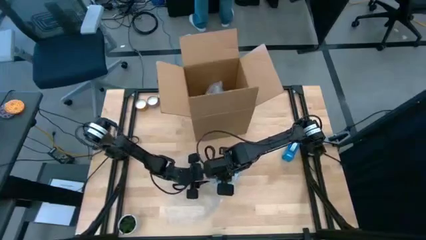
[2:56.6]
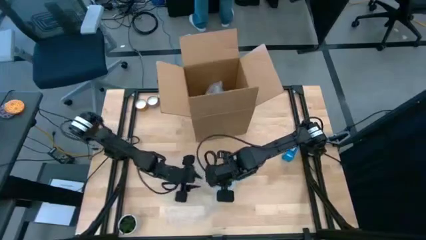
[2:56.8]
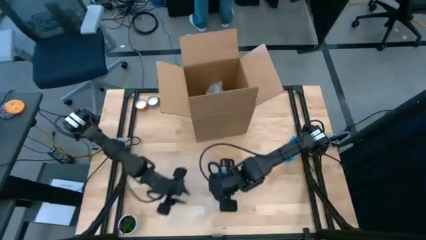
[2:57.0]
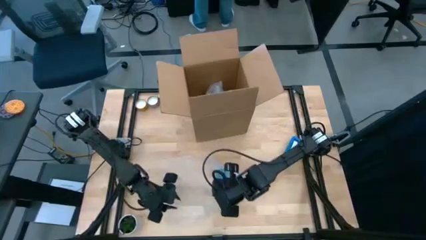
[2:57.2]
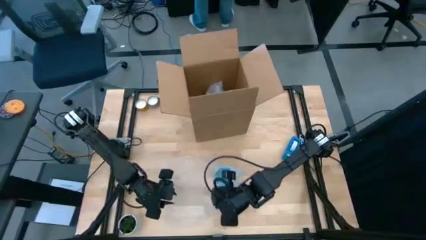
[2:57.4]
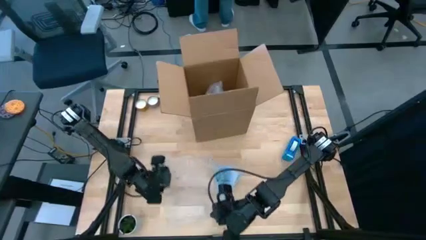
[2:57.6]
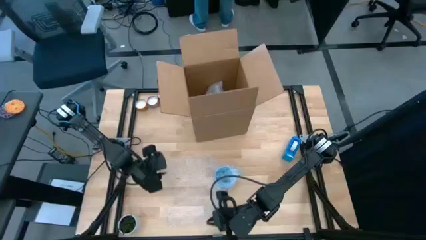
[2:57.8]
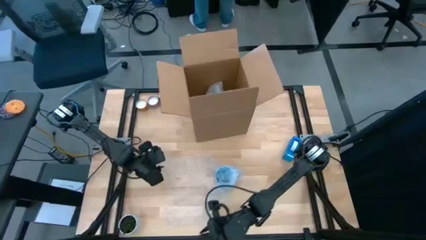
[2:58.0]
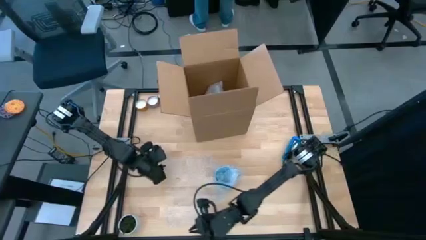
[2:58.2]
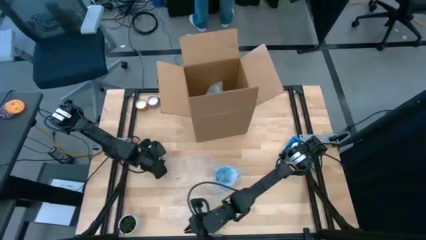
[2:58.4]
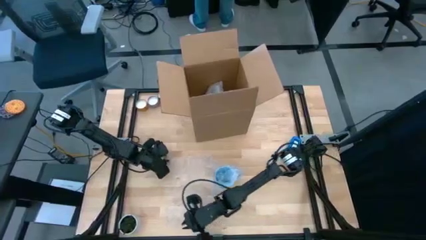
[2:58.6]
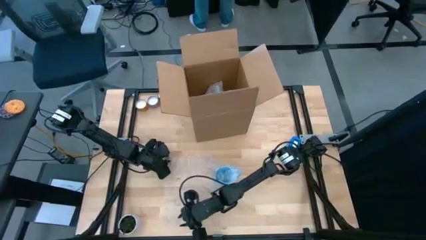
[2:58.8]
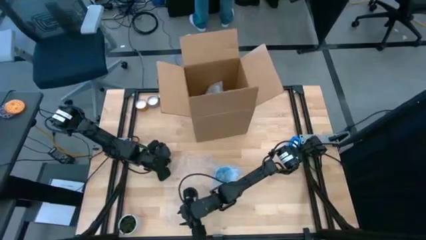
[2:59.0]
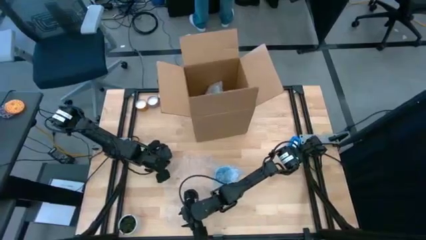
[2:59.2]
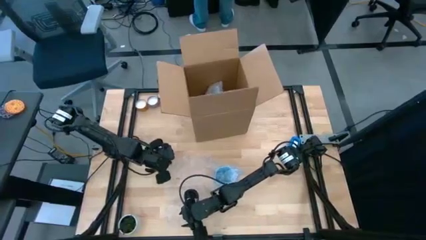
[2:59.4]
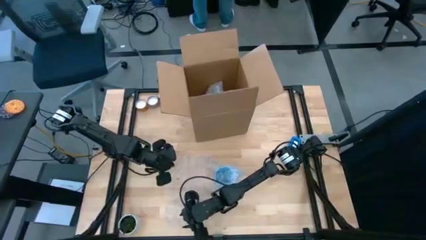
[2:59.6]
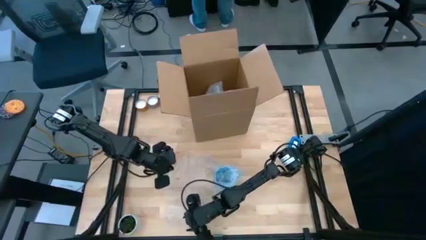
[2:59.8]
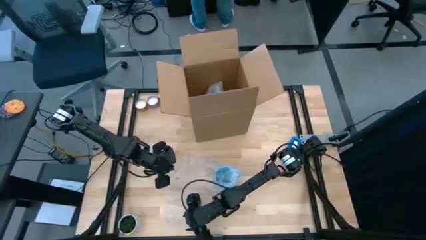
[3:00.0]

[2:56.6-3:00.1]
Task: wrap mug
Wrap the blue cup with bubble wrap

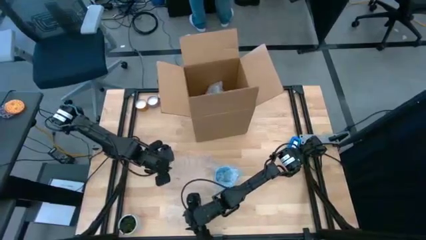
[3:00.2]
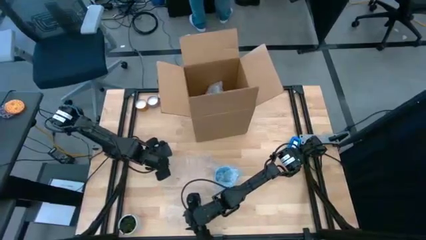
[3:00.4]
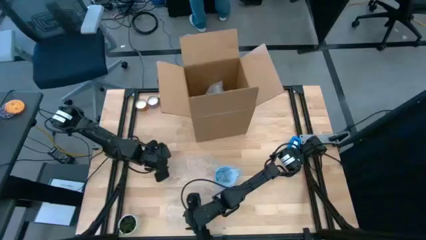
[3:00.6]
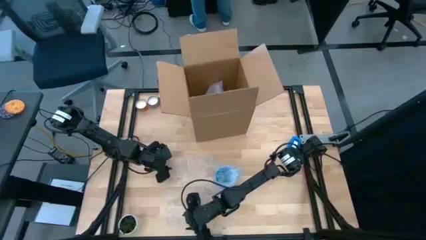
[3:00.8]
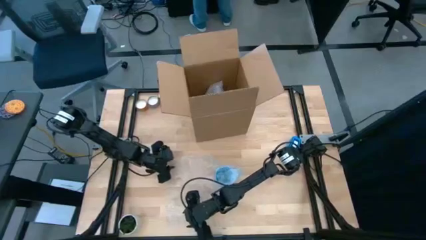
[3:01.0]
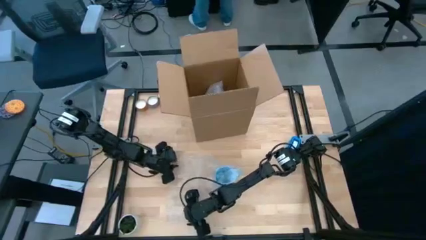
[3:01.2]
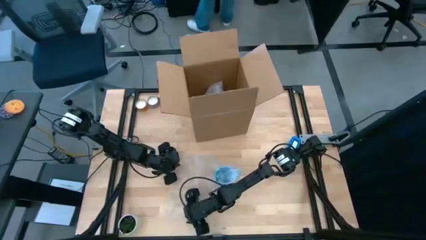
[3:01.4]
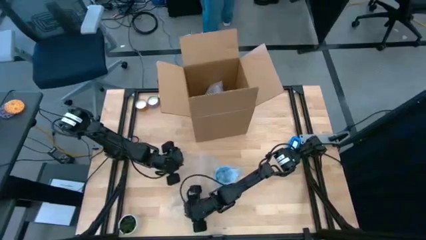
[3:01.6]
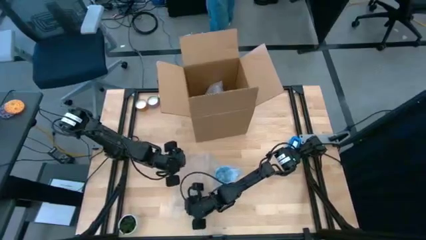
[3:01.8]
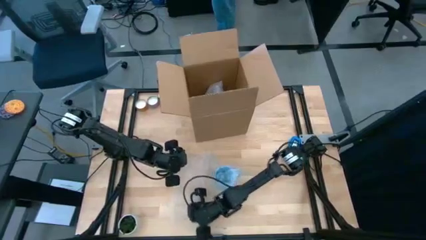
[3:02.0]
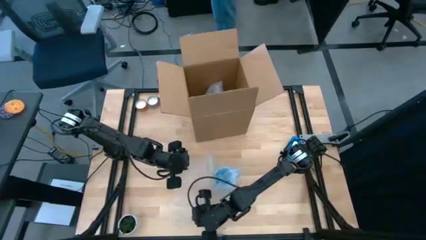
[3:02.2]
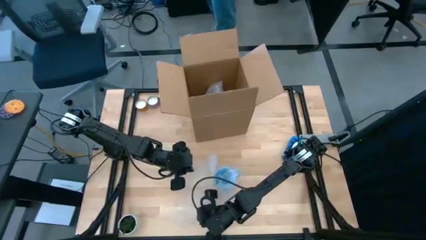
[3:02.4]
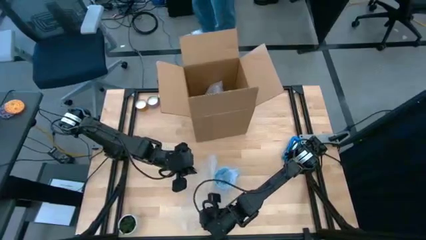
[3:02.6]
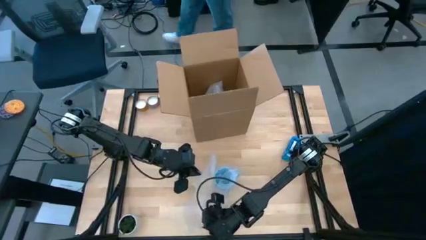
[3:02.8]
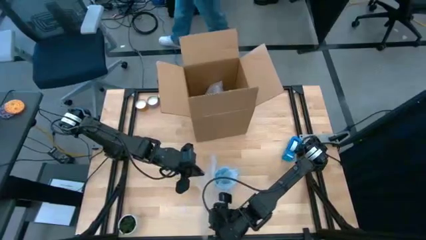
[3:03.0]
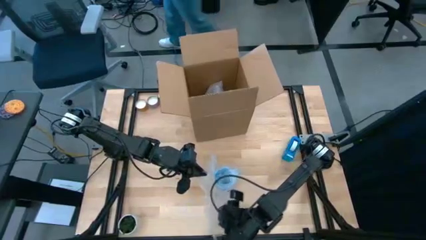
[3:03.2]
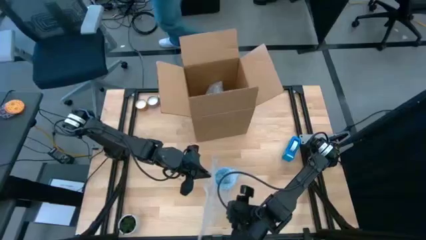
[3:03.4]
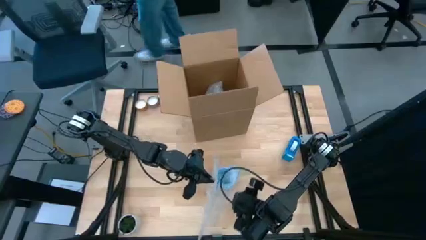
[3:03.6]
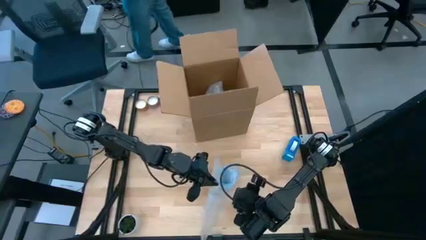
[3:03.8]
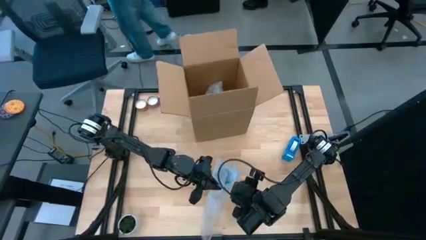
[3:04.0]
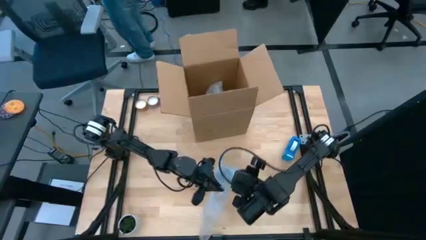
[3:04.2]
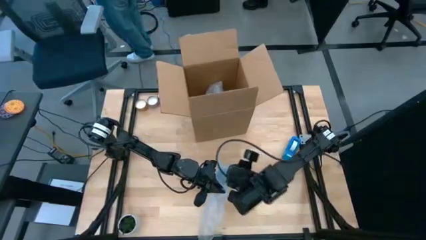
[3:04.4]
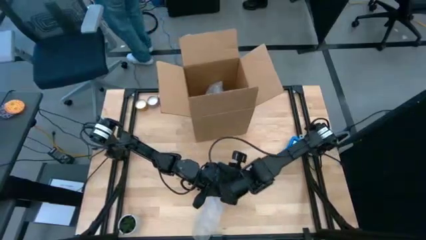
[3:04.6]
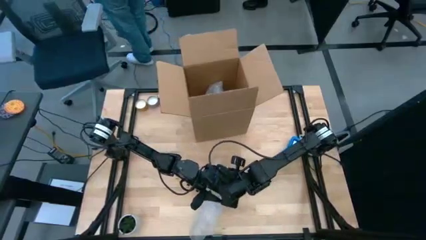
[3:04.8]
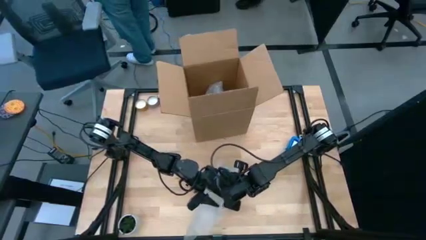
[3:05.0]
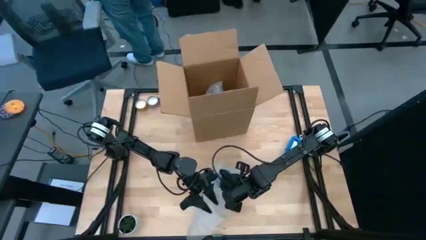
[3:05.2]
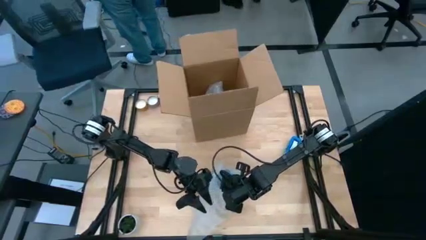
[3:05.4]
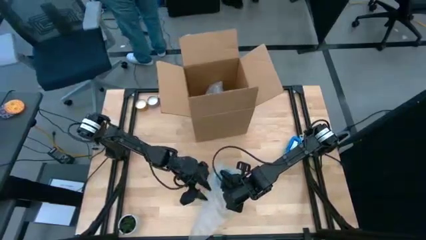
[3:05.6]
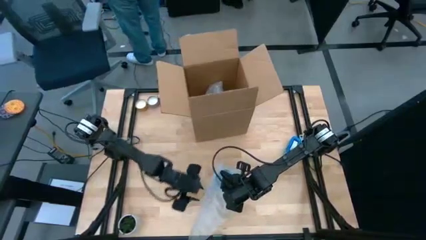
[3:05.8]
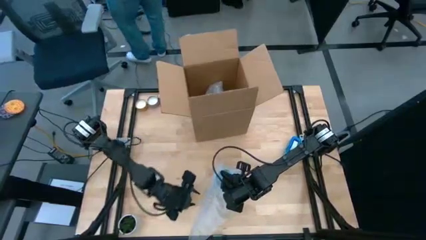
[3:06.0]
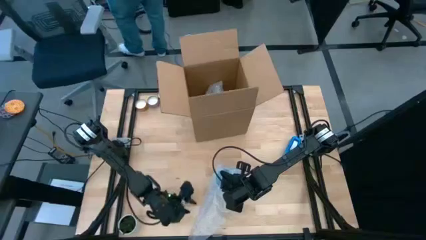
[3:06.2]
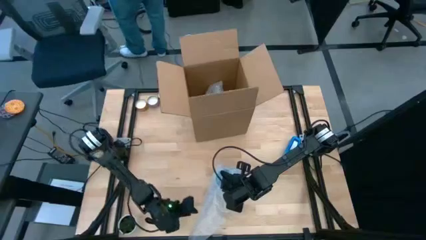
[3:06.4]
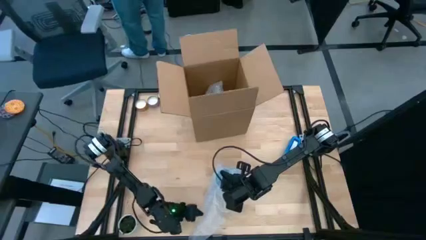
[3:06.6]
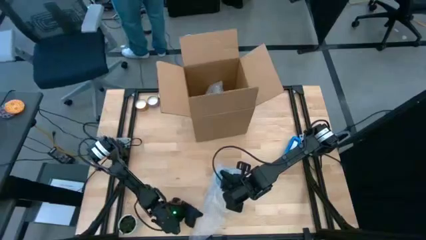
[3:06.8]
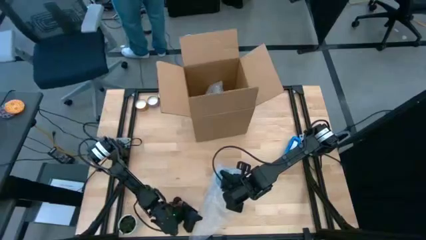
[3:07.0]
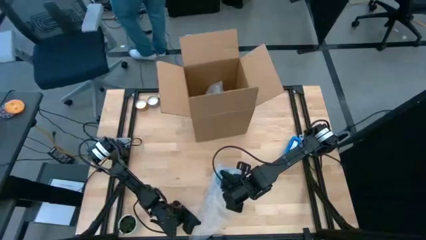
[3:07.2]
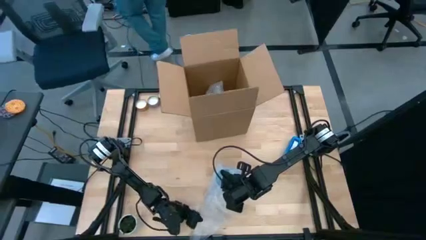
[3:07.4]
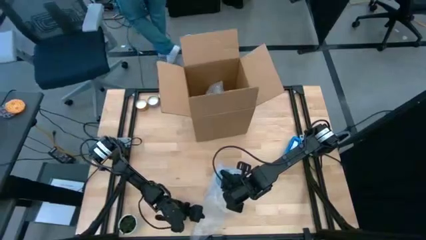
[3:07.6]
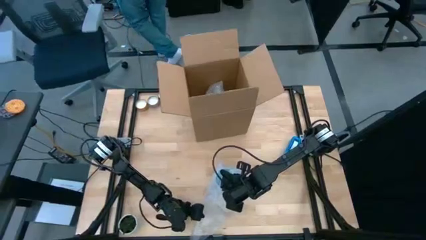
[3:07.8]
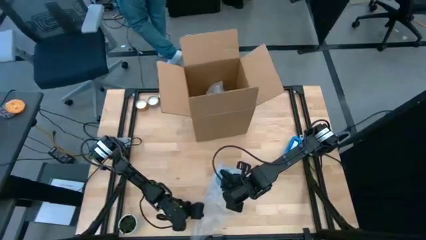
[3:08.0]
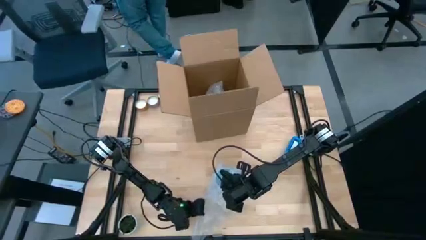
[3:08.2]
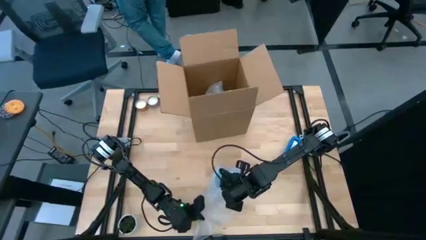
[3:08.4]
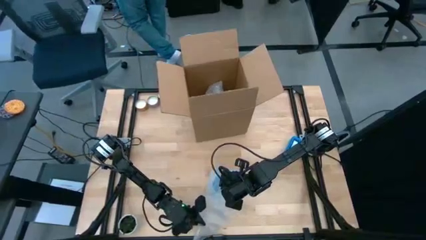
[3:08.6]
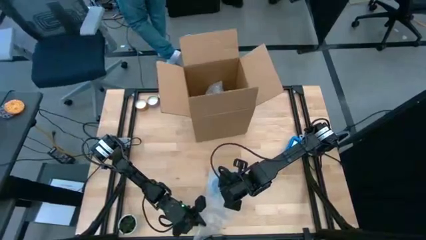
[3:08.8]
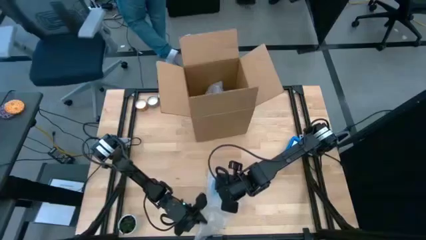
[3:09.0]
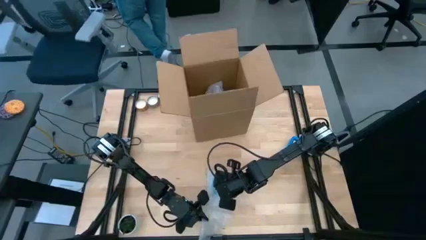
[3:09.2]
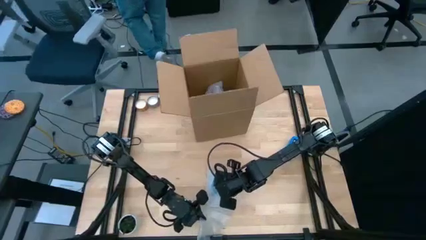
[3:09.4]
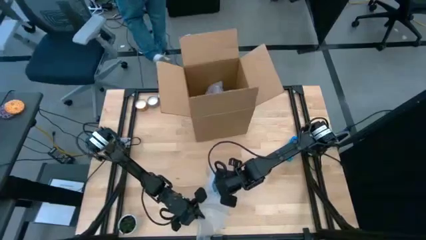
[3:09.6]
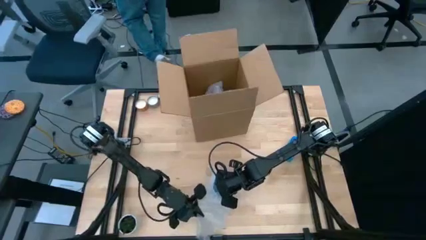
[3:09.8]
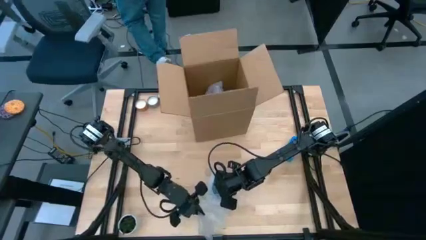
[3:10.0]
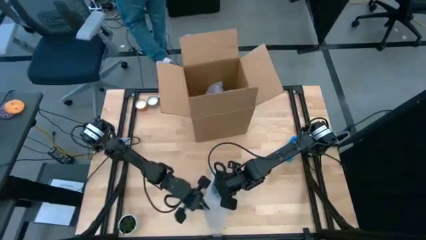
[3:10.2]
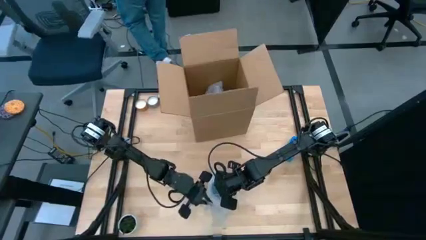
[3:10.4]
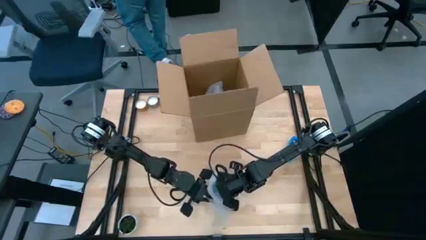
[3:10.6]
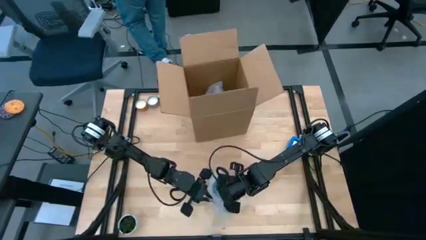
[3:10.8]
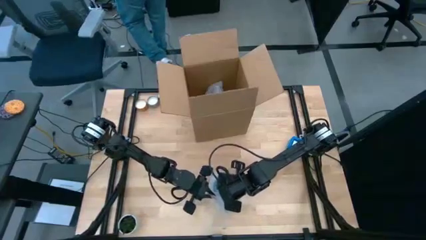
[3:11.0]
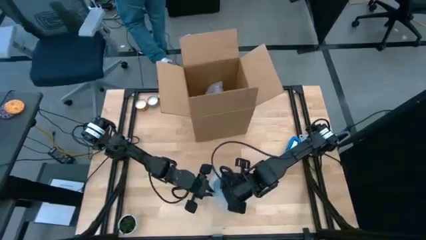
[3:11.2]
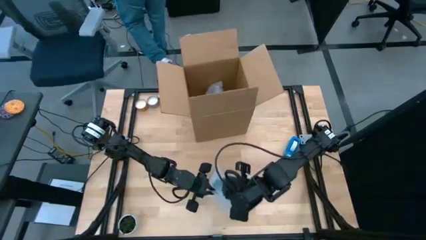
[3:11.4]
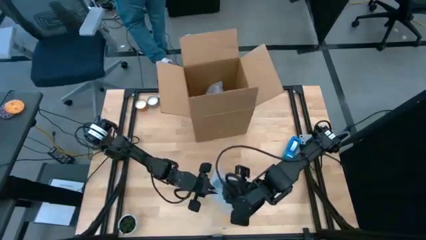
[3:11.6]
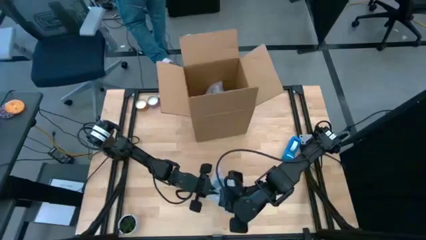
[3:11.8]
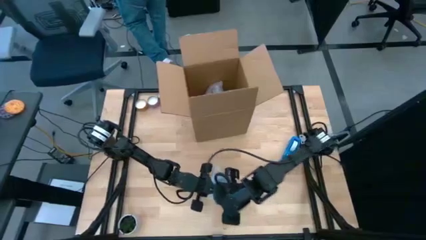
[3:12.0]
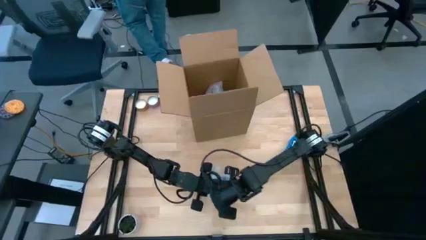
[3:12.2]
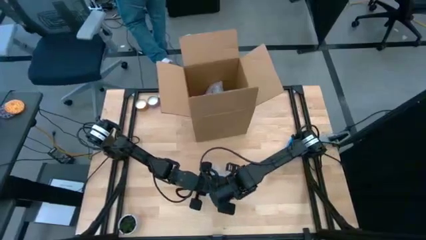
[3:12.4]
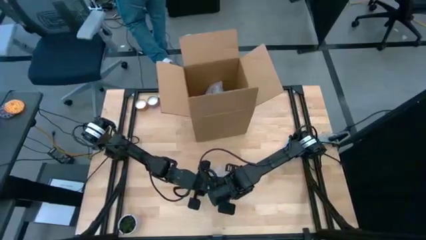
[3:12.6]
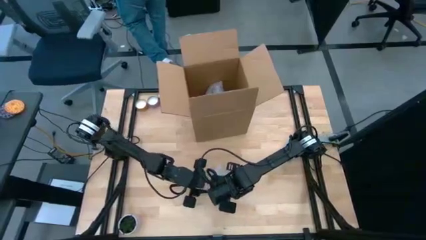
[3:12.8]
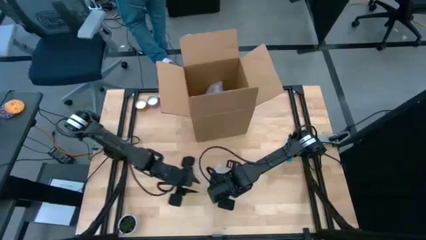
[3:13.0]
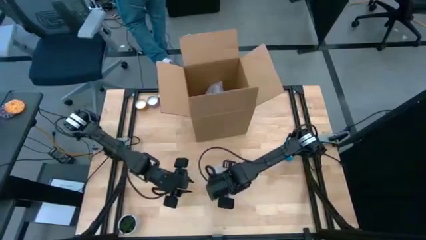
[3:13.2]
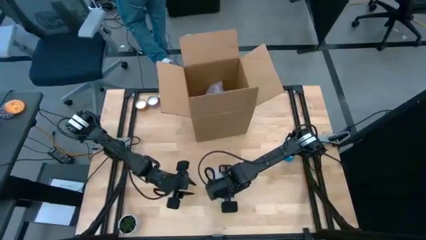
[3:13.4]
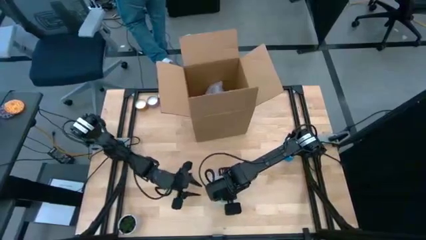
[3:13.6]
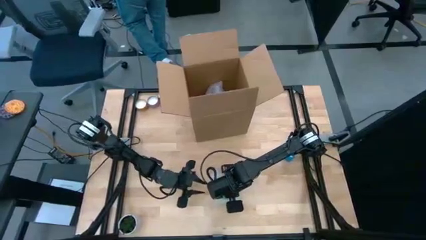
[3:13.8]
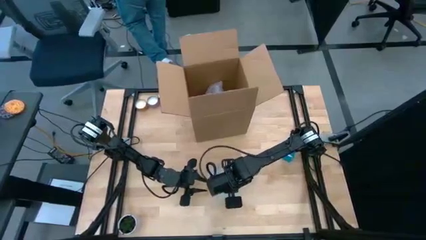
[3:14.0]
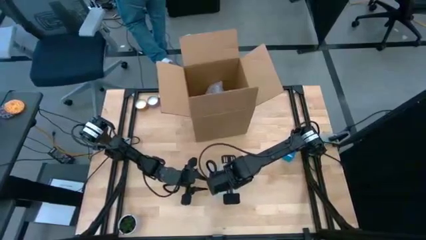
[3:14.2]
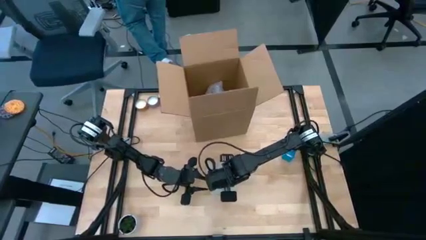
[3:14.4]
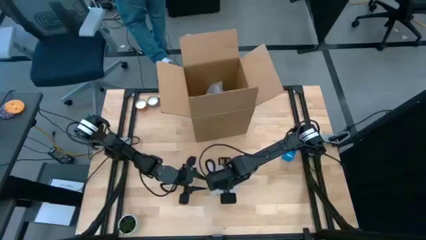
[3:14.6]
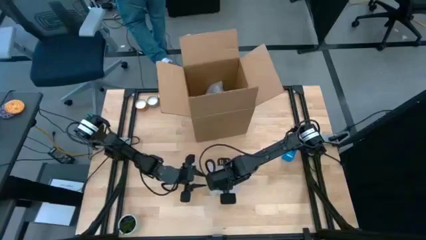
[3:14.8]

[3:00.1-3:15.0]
Wrap the blue cup with bubble wrap
